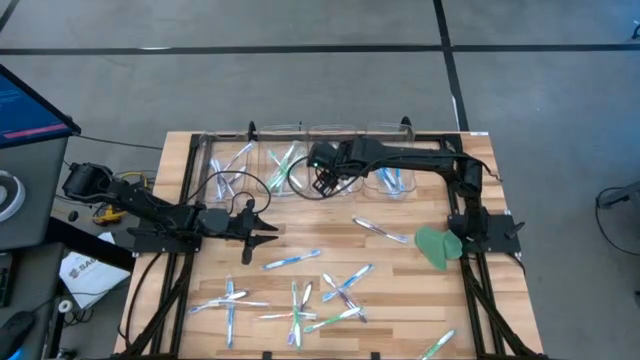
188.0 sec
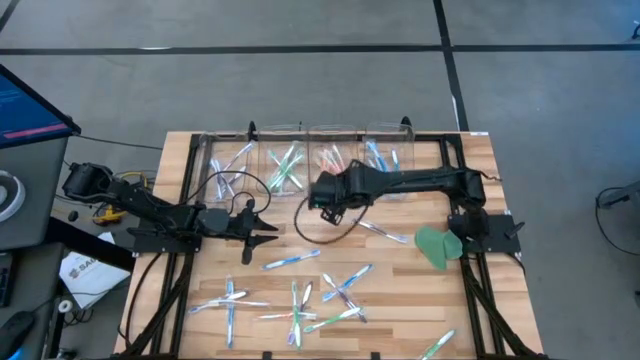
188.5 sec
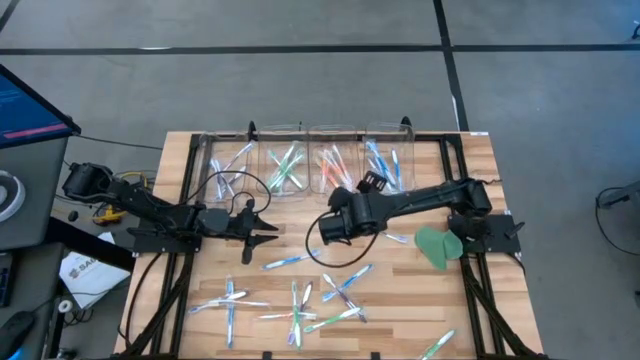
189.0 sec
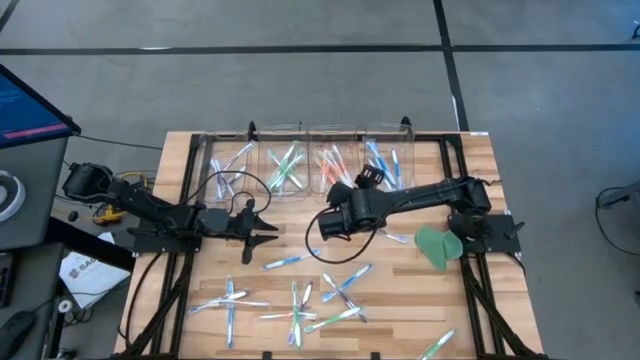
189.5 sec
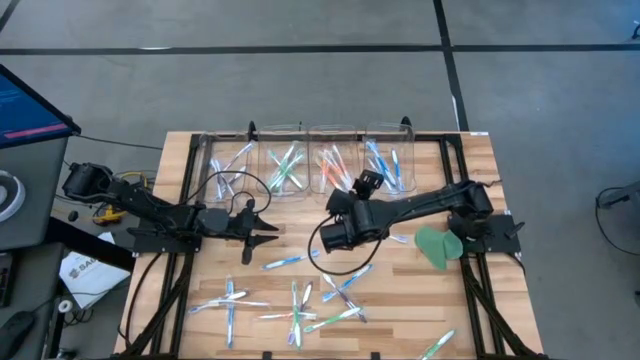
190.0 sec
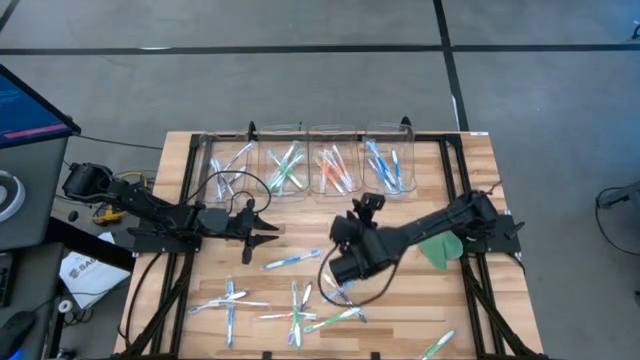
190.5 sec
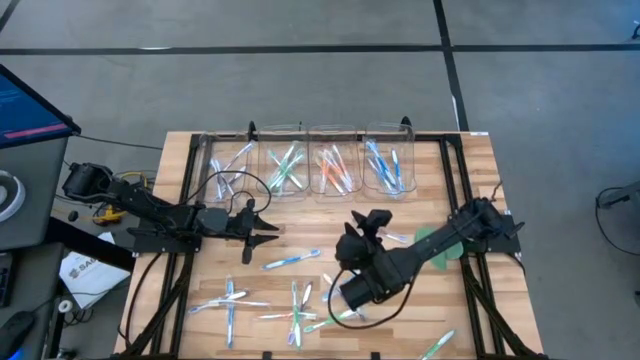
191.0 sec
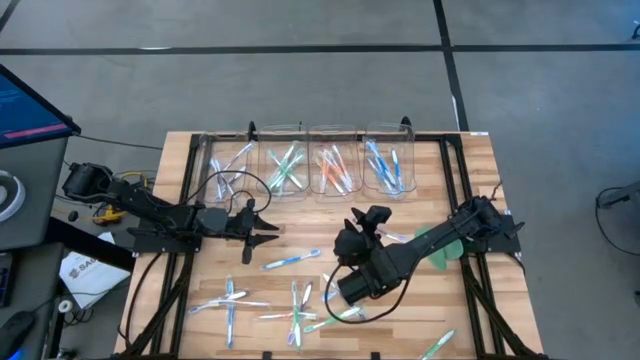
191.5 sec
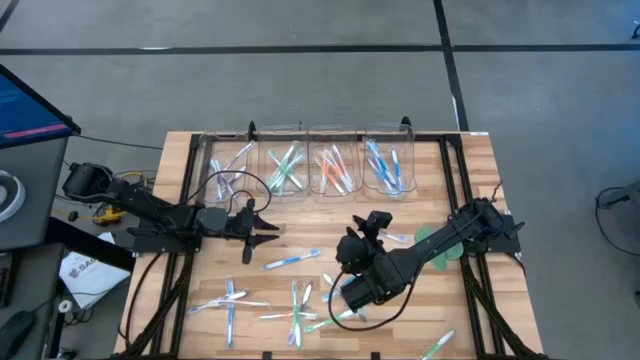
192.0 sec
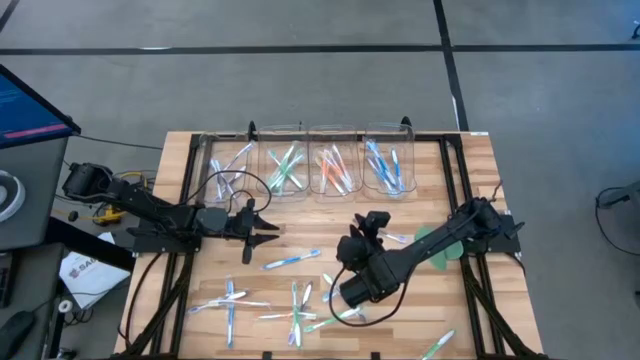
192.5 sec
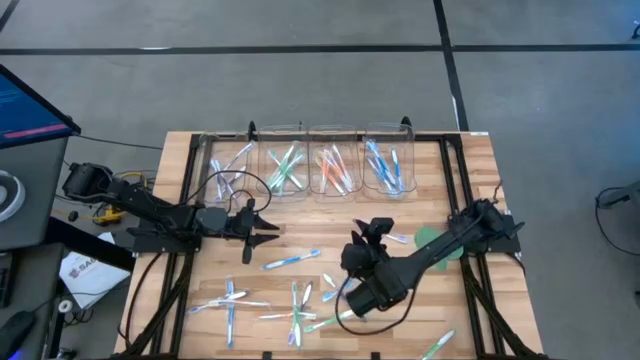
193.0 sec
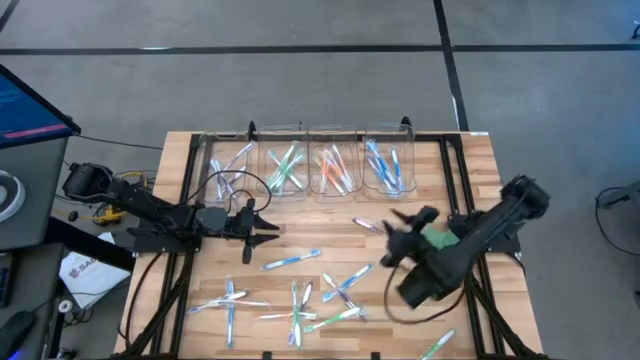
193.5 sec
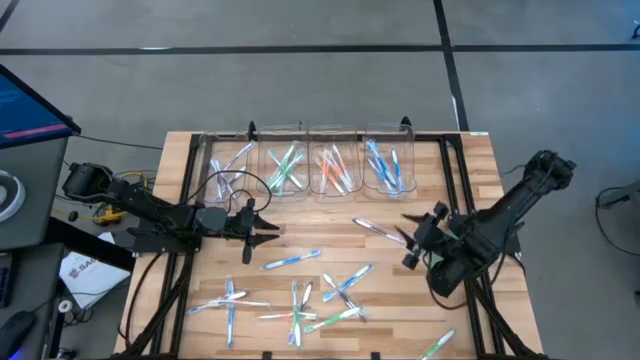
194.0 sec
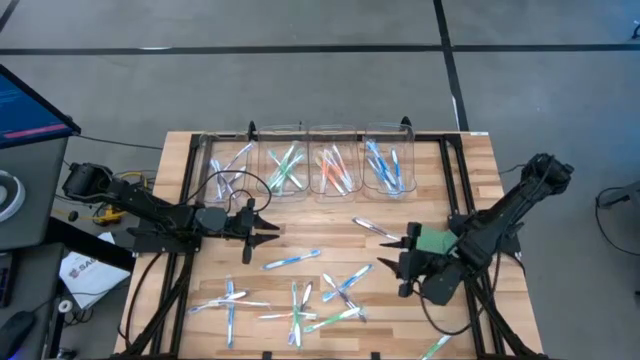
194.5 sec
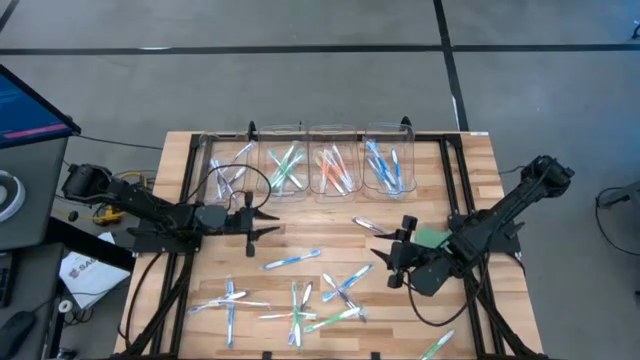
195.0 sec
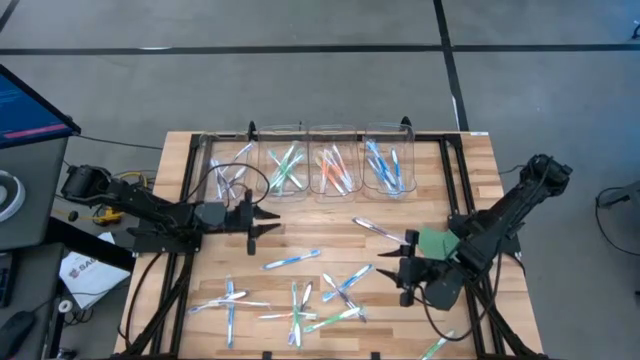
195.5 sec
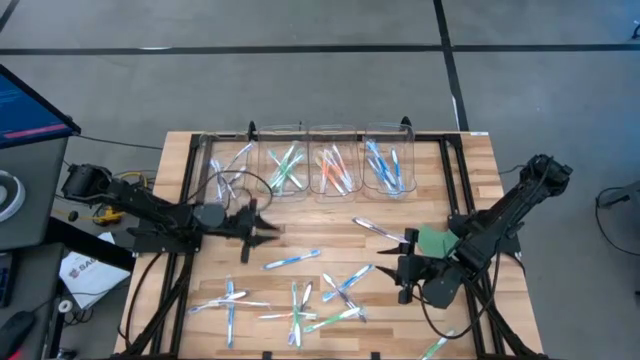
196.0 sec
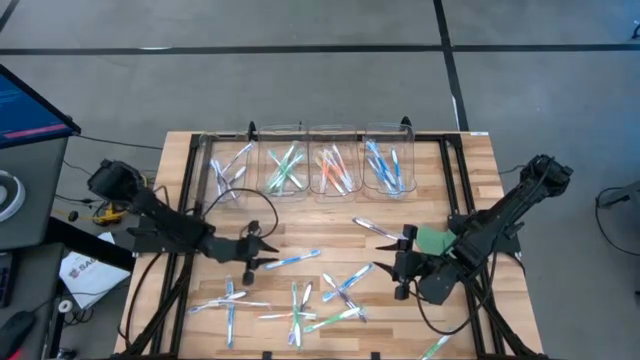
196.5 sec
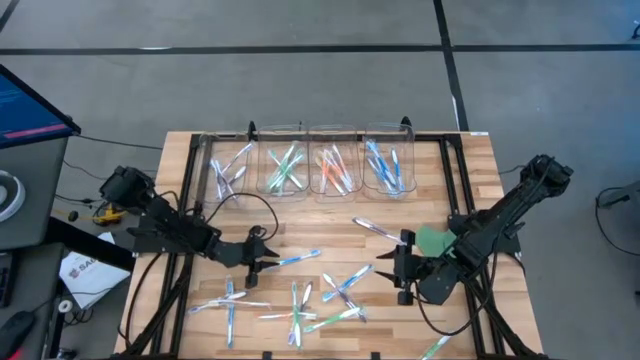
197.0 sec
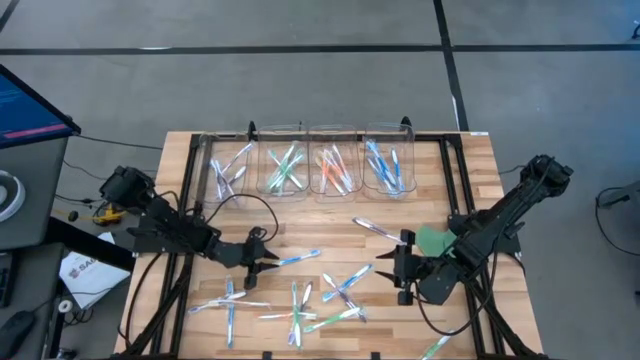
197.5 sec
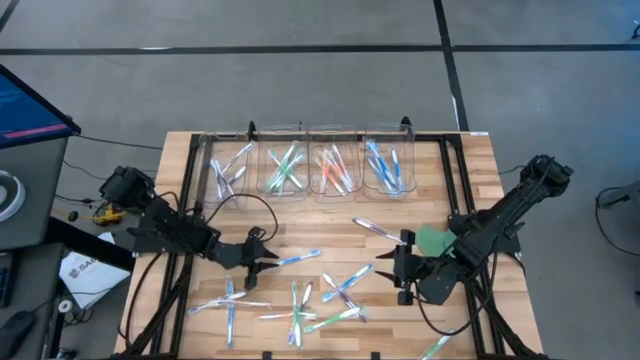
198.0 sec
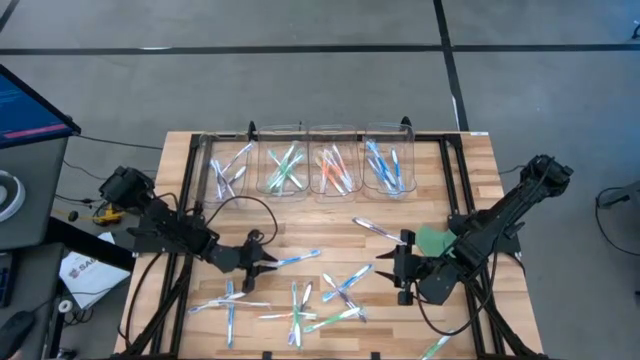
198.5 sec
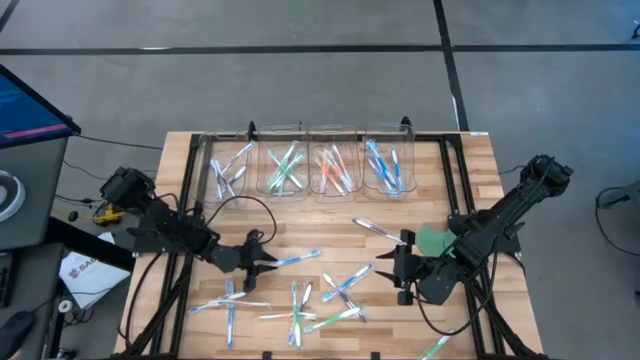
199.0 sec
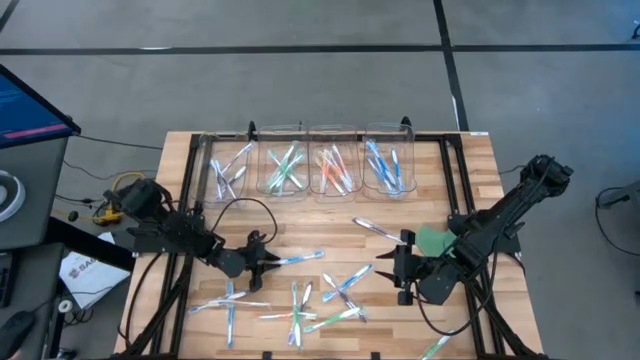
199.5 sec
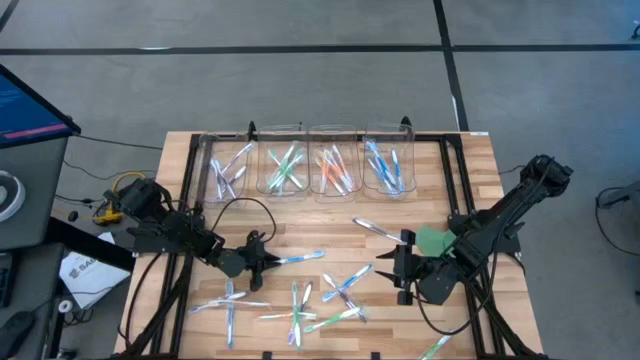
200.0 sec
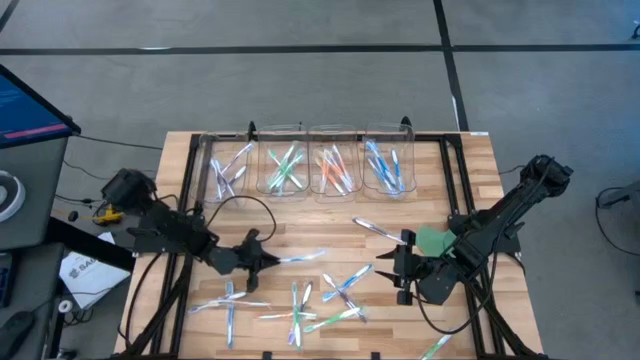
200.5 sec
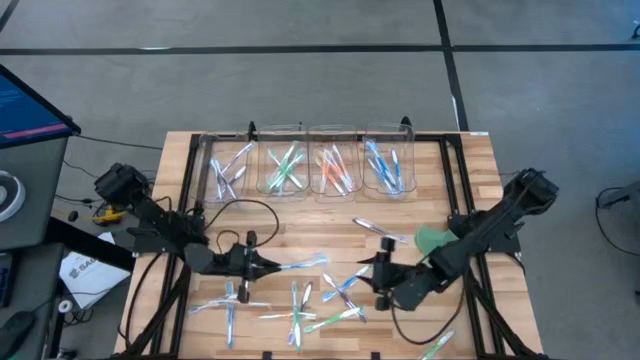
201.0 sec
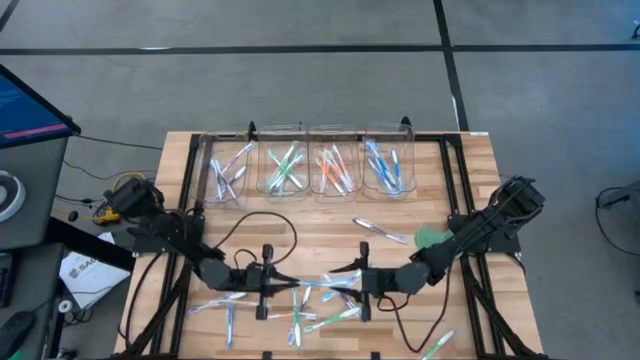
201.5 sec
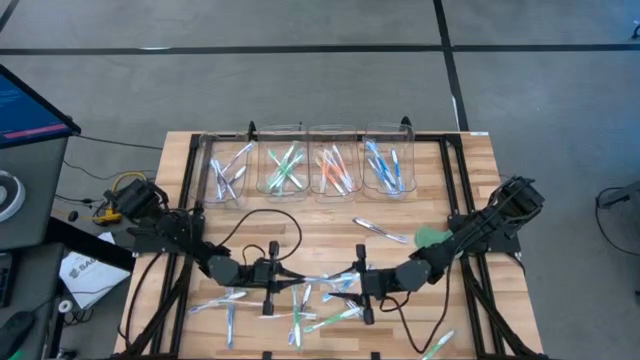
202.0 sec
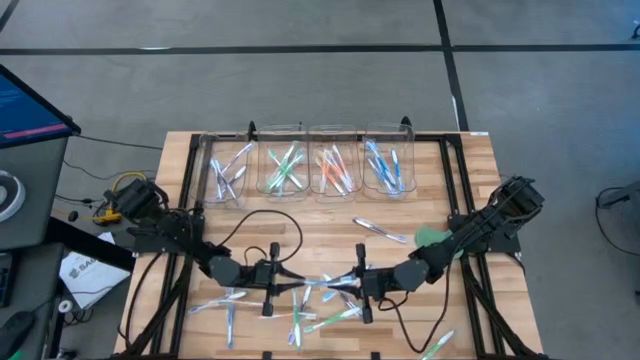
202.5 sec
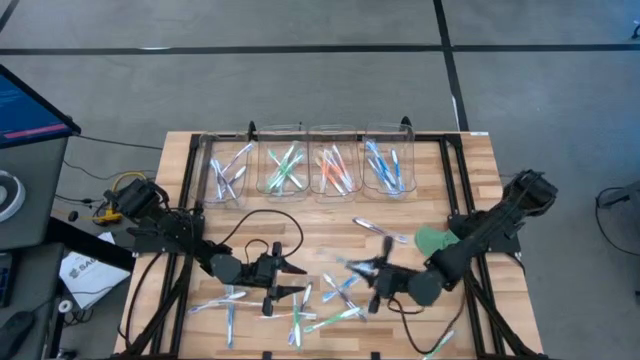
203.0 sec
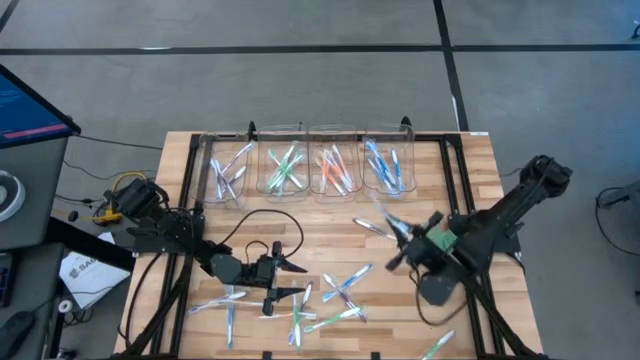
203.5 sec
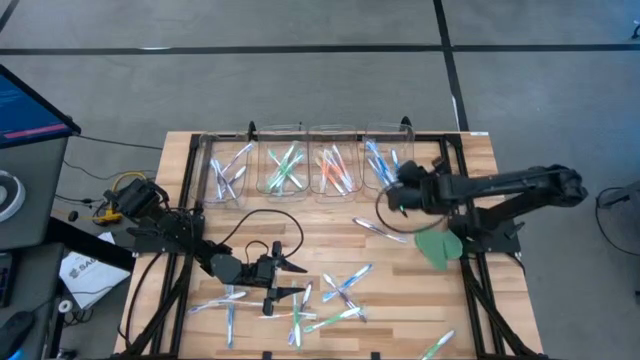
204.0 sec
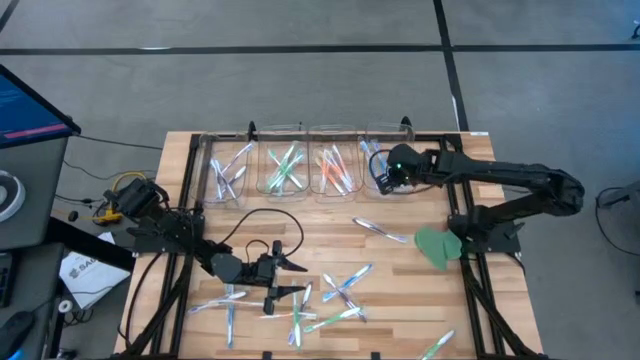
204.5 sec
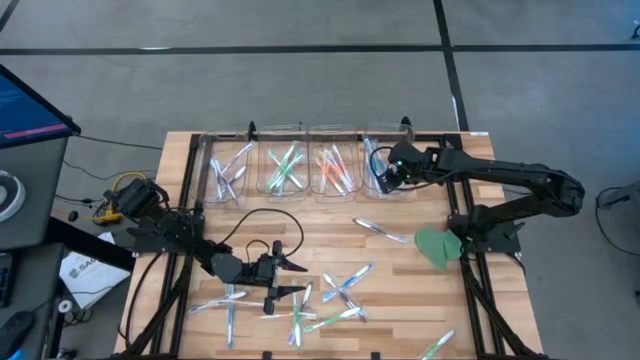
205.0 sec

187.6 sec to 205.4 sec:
Task: Pick & Place Toothbrushes
Put the blue toothbrush into the right transparent bin

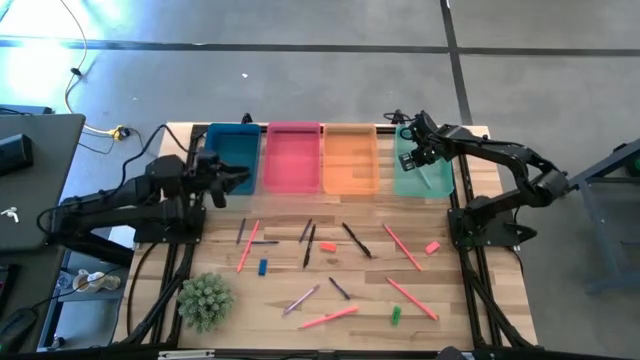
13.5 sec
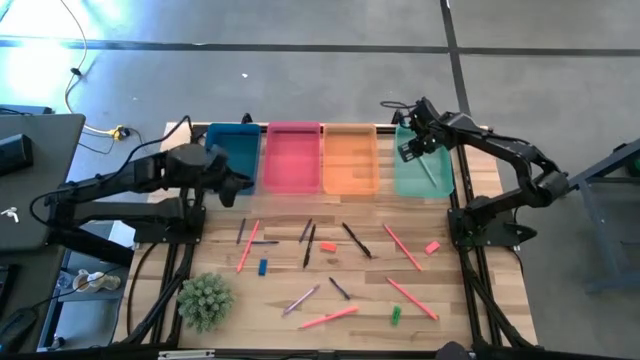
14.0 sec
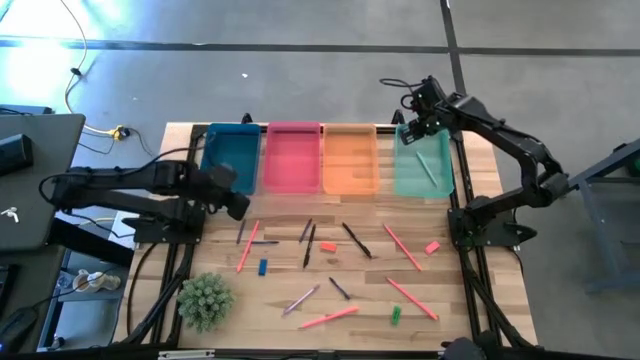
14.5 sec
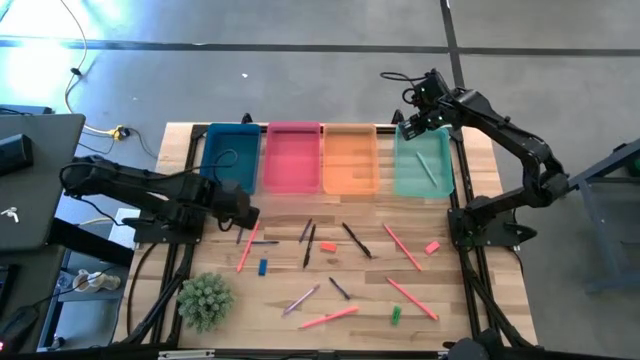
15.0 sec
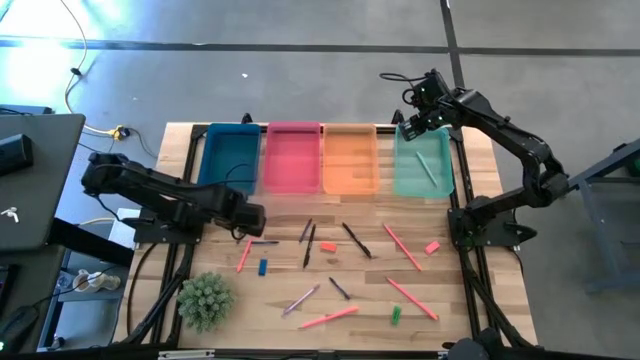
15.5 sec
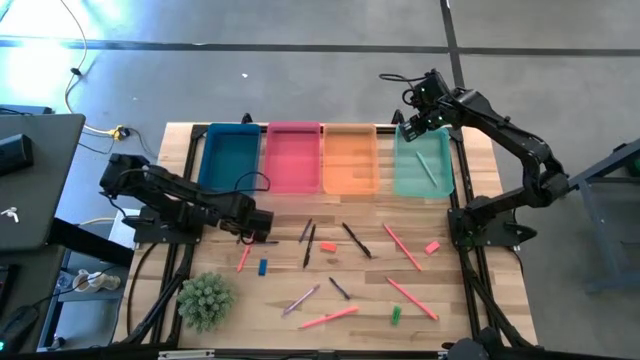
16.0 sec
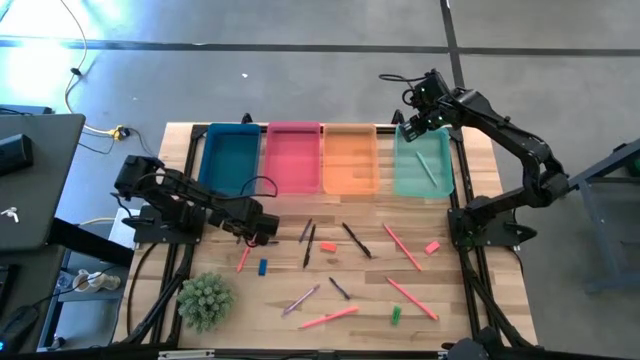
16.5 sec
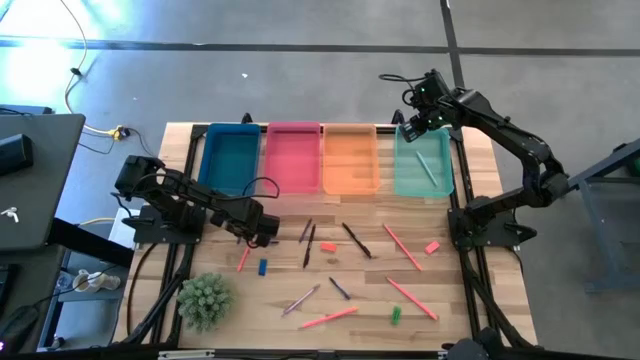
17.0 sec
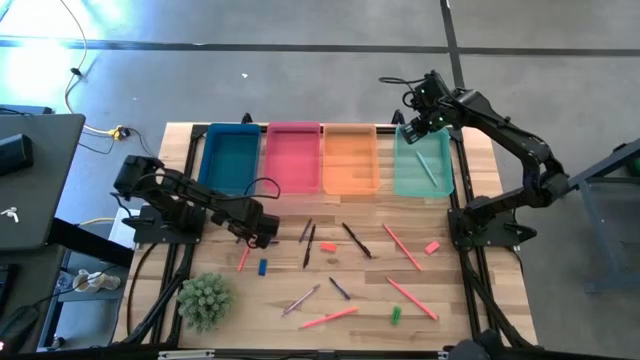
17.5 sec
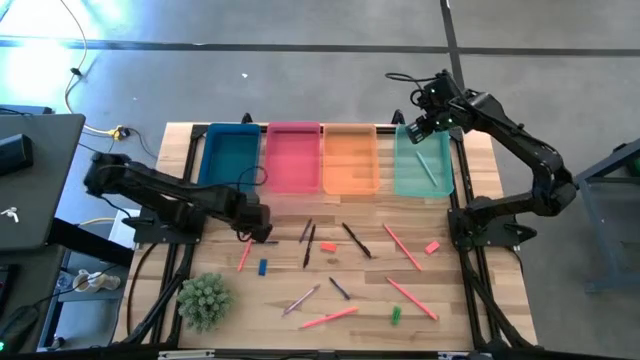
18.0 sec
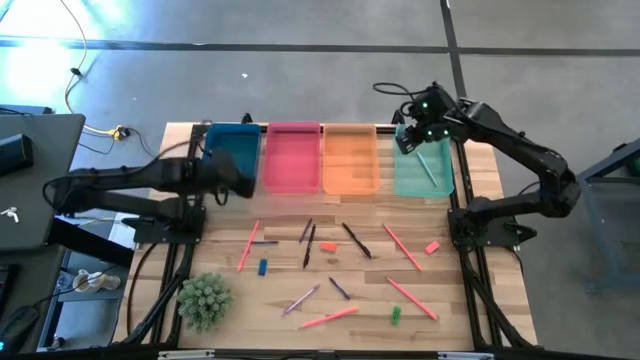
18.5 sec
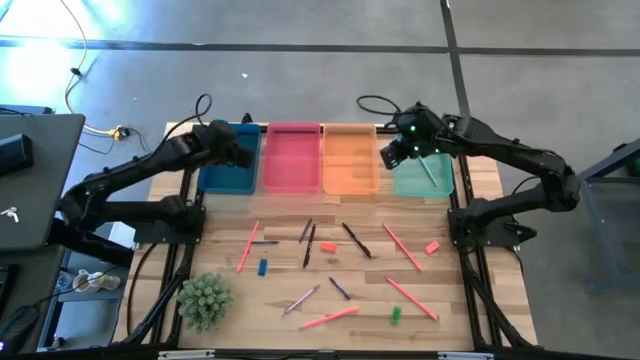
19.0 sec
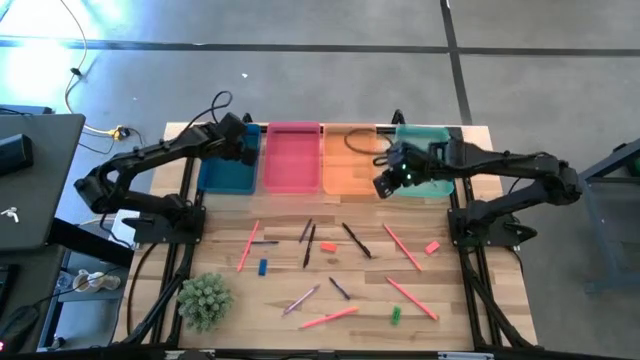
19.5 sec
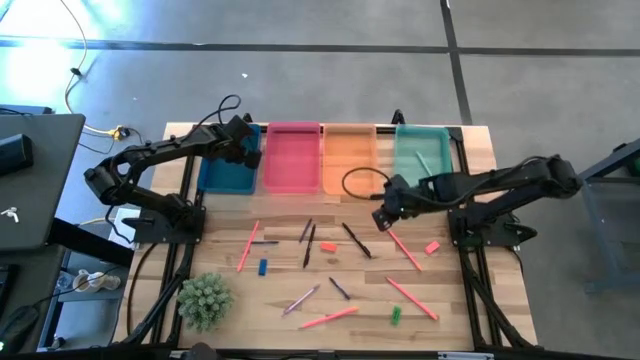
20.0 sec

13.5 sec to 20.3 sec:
Task: Sort crayons/erasers/pens/pencils in bins
Put the blue crayon into the blue bin
